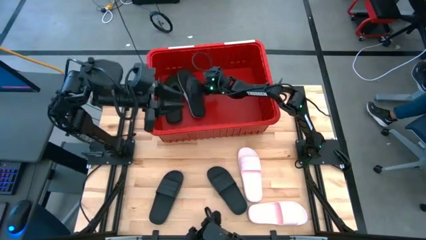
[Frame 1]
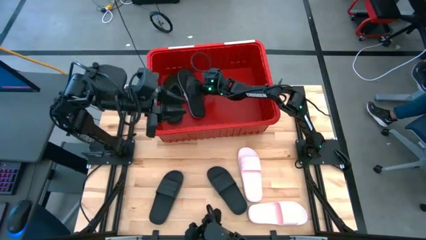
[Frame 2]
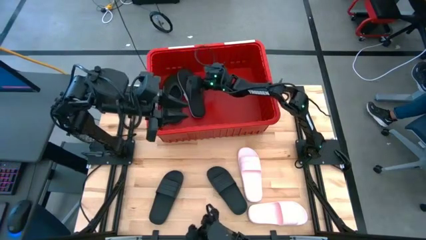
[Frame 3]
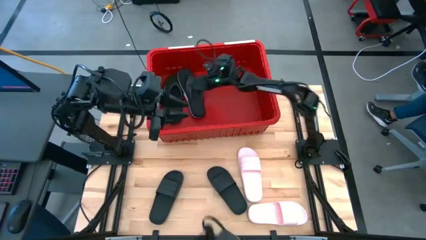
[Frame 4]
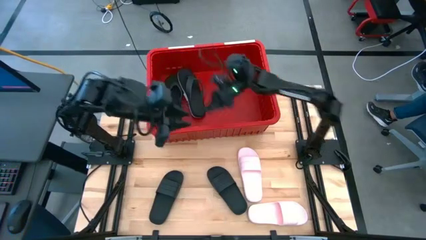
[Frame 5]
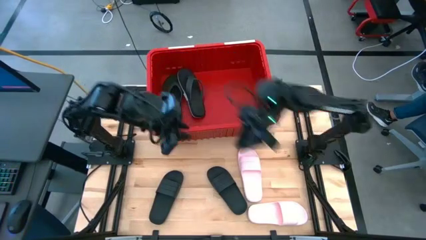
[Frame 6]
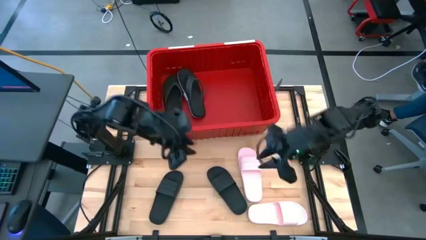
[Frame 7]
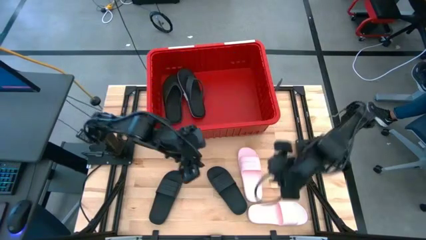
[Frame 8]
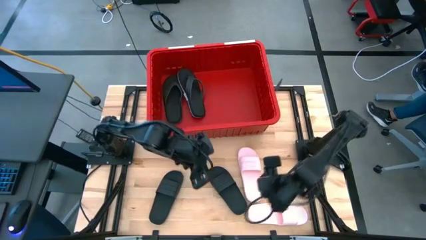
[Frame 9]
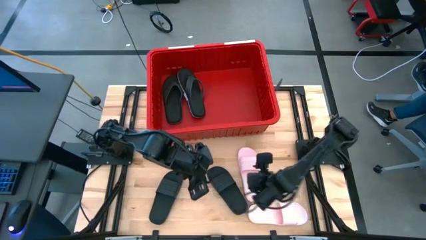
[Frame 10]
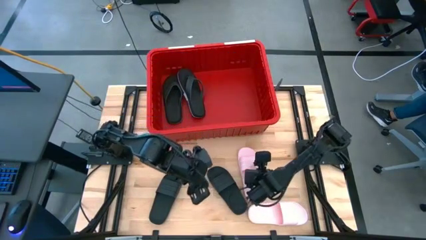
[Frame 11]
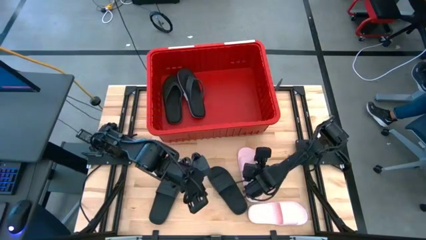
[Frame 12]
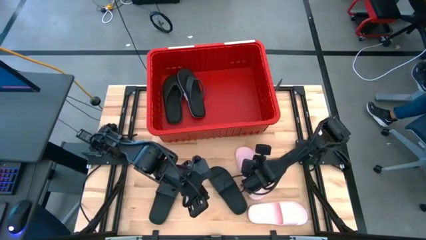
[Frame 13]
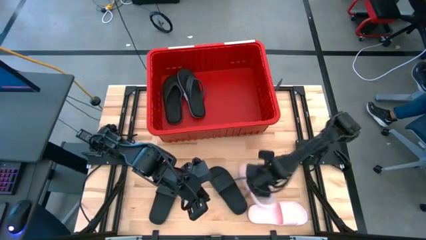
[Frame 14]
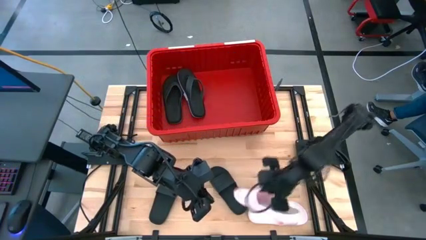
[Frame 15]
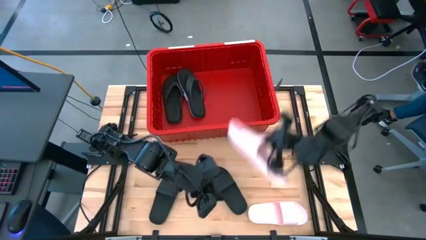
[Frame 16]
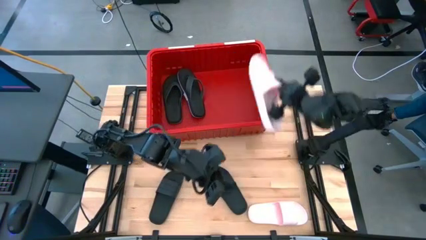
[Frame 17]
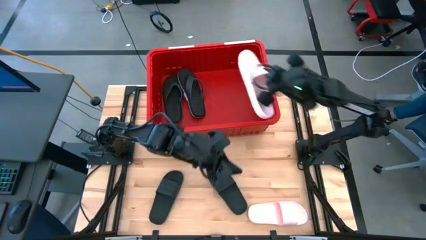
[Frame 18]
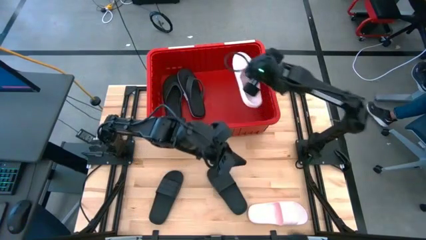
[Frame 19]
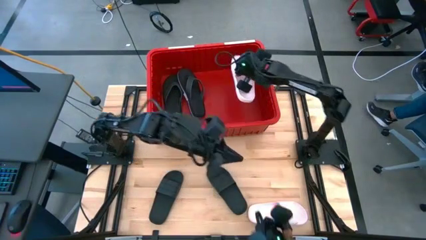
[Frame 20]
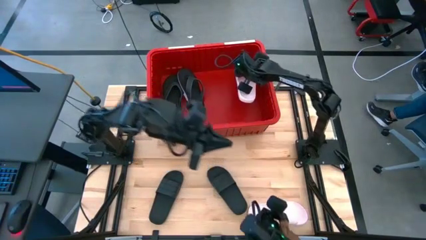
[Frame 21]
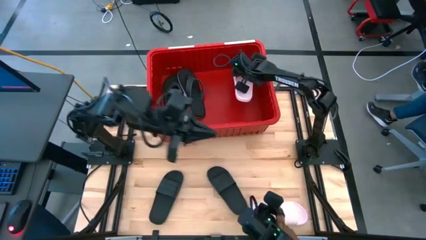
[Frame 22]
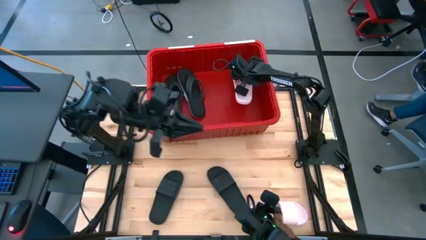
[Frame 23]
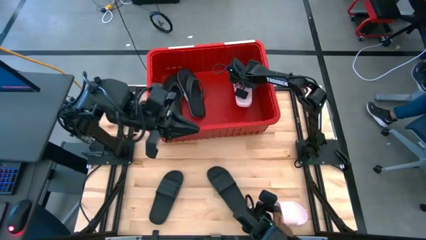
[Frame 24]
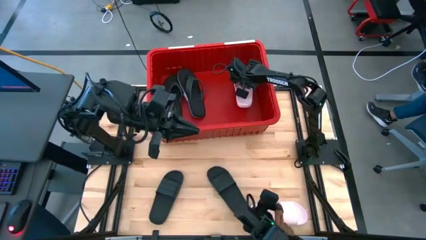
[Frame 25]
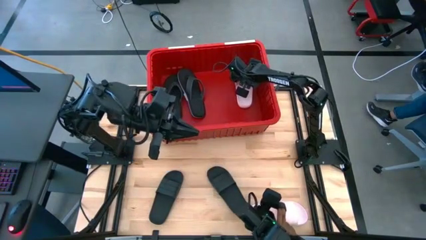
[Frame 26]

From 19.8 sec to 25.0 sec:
Task: Pick and place slides into bin
Put the top pink slipper into the red container

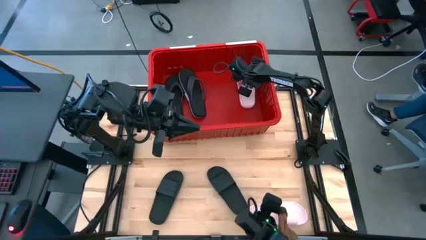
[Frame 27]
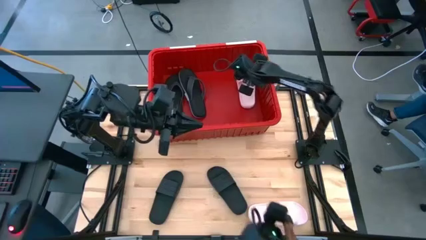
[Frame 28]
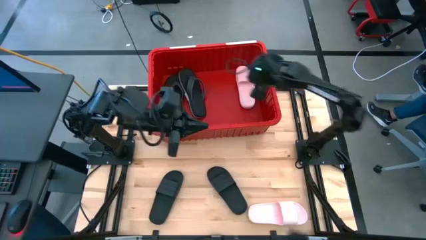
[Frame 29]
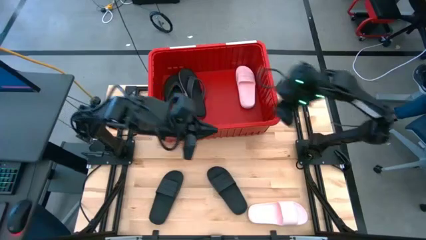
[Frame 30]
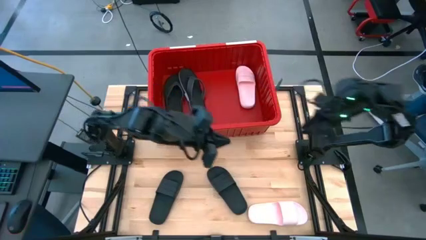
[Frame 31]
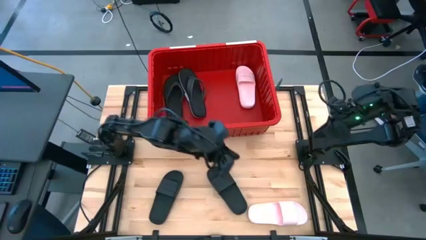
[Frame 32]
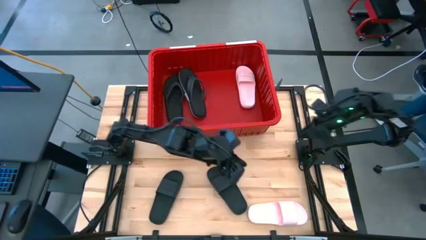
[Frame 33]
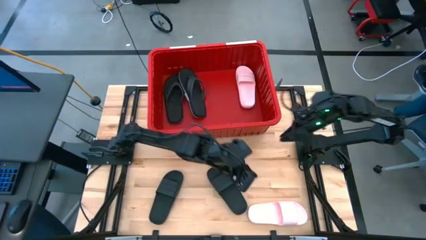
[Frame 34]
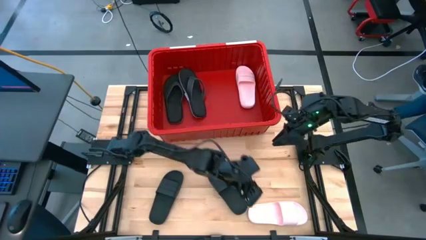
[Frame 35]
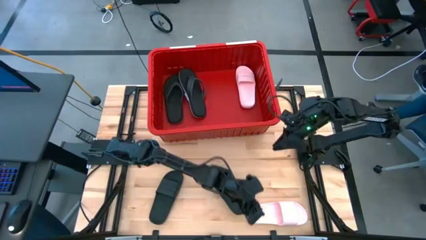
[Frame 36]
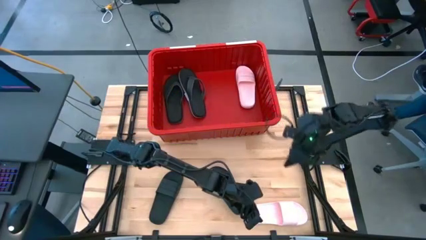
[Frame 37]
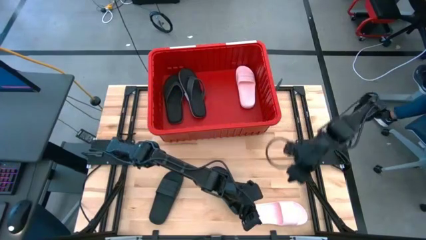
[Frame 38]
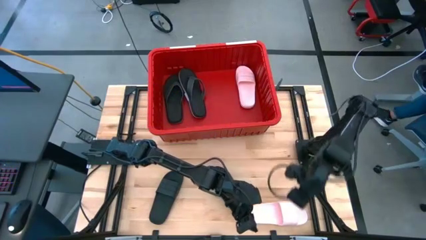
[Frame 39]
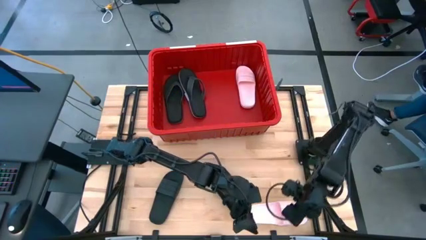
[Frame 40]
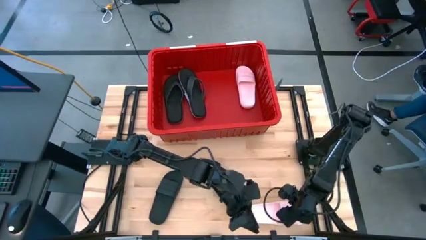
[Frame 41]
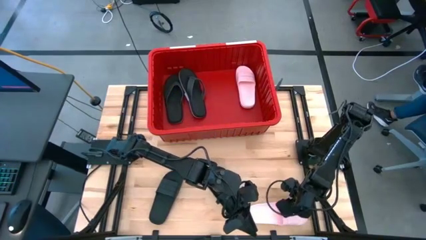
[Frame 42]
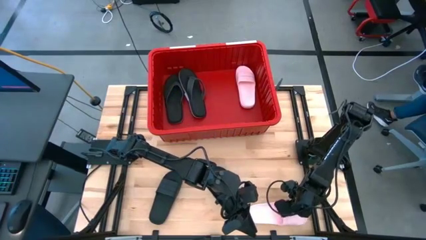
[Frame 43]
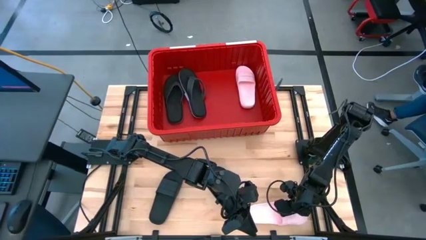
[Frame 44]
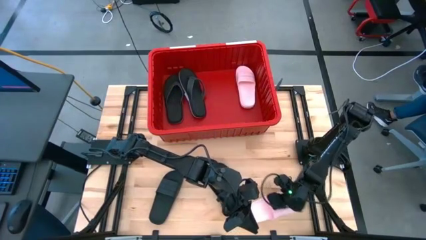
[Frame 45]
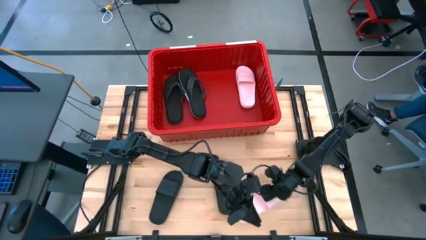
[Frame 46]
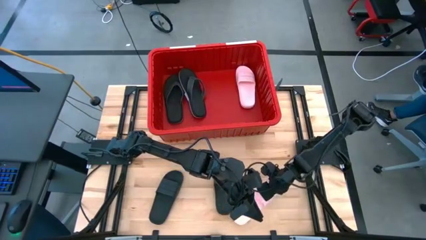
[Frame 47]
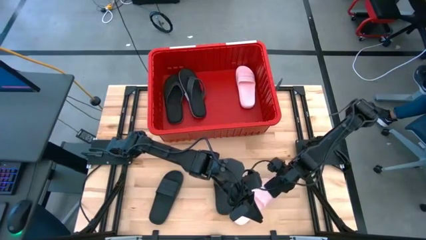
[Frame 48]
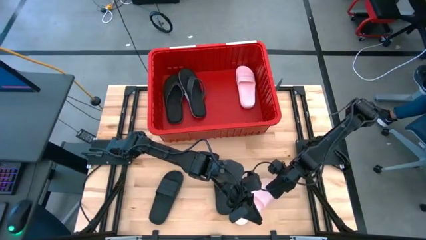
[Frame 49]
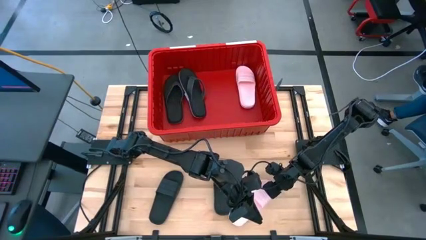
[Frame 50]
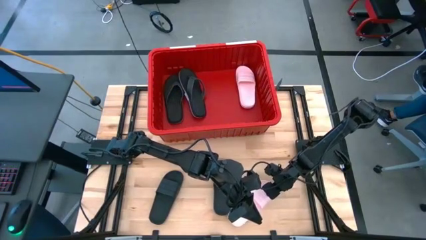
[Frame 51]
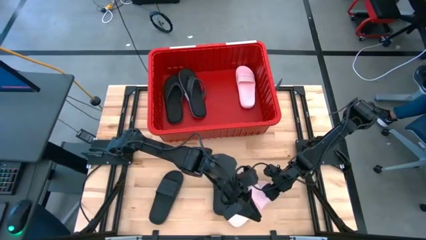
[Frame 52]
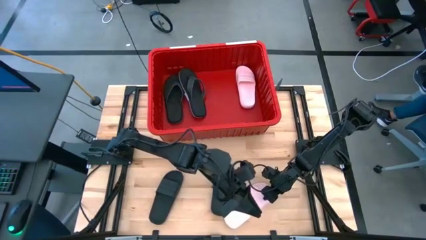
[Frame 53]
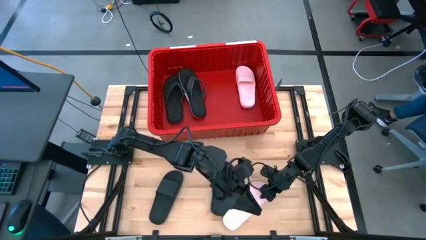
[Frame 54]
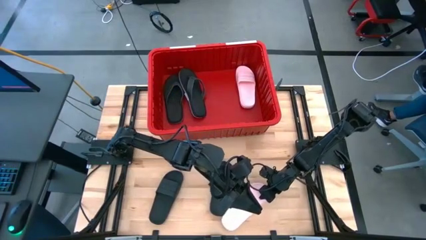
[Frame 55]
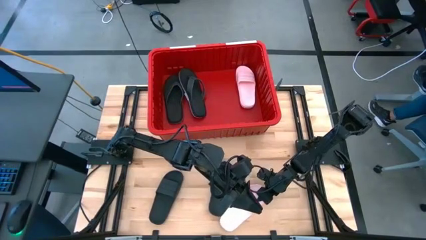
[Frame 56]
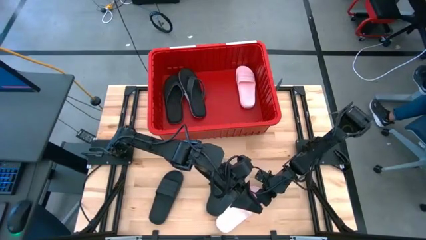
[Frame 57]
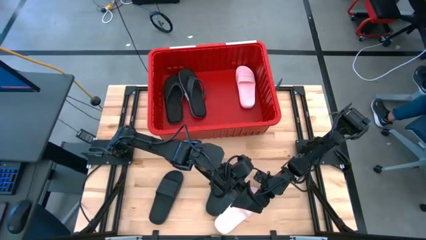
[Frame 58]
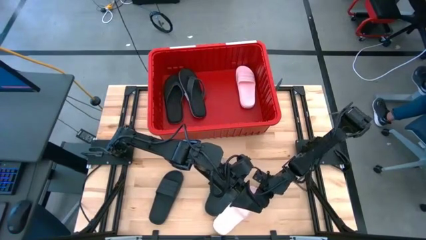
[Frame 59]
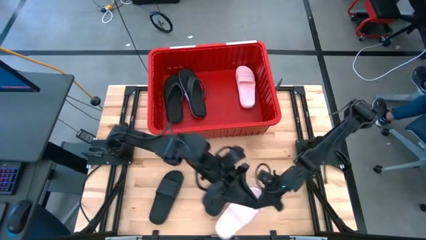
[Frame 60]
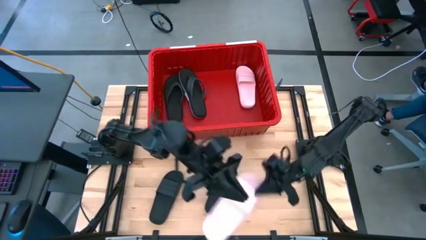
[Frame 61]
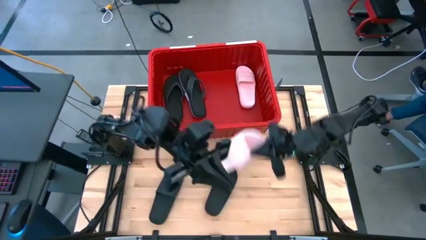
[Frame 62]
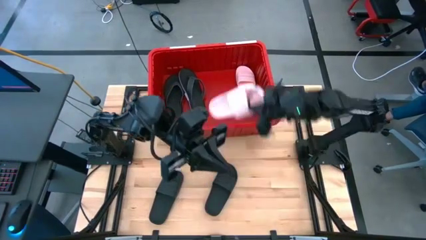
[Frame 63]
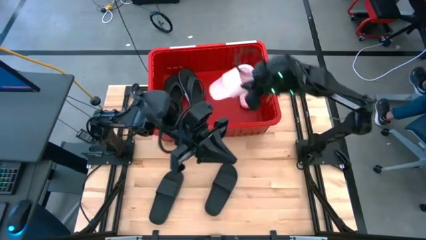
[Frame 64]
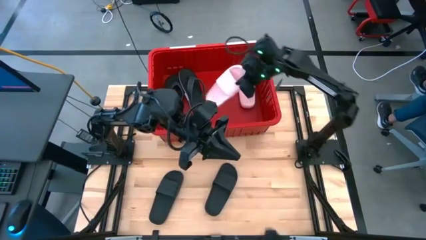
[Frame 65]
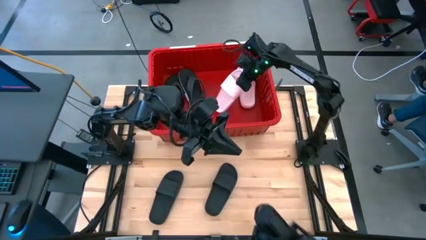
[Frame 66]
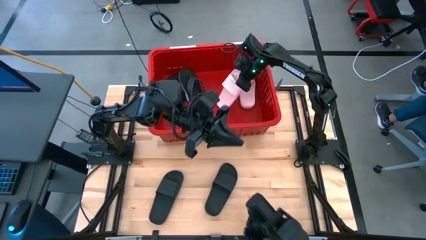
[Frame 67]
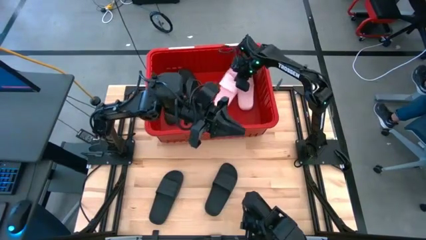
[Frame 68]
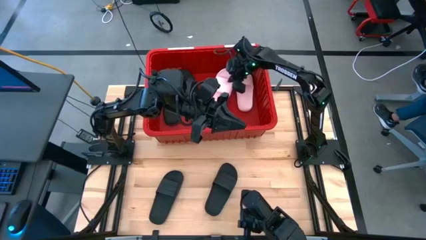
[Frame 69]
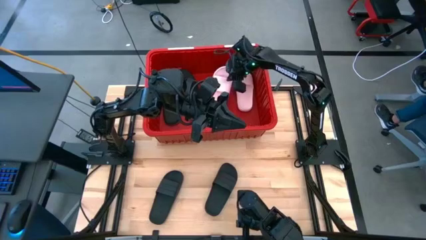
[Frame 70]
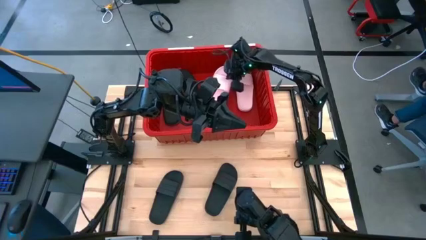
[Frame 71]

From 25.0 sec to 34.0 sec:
Put the pink slipper into the red container

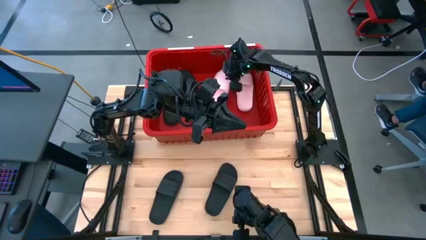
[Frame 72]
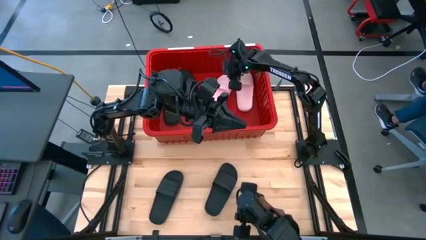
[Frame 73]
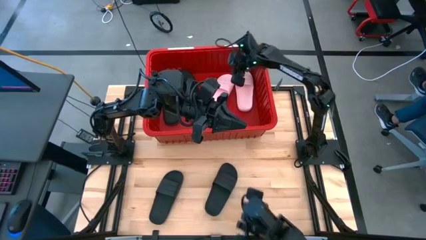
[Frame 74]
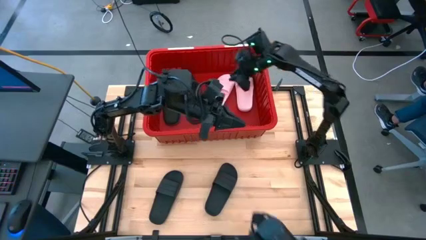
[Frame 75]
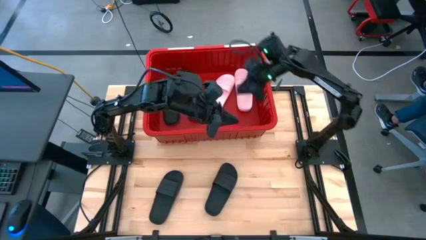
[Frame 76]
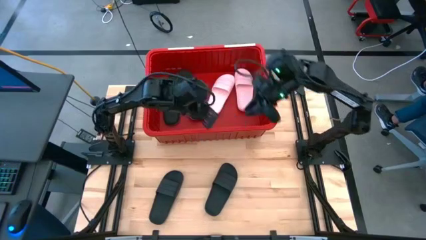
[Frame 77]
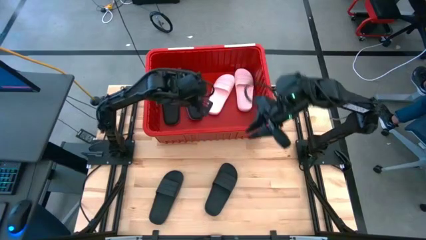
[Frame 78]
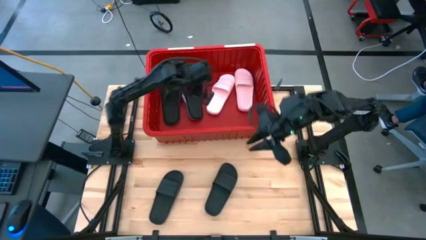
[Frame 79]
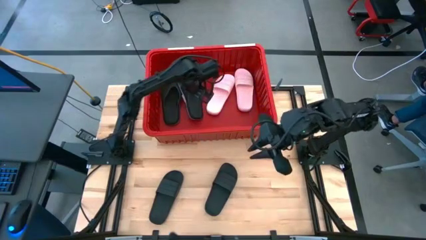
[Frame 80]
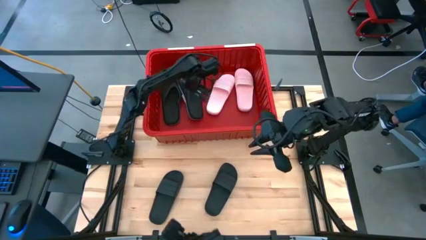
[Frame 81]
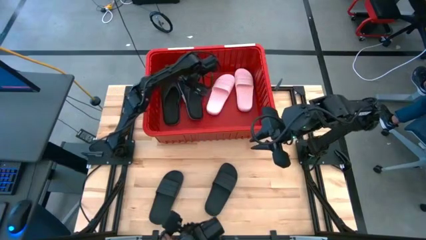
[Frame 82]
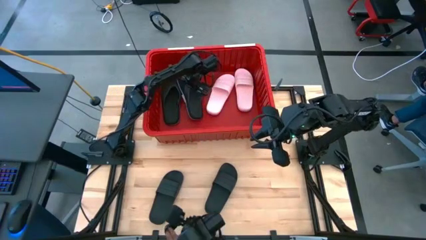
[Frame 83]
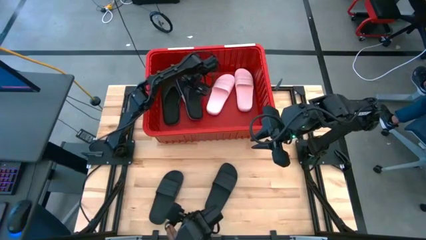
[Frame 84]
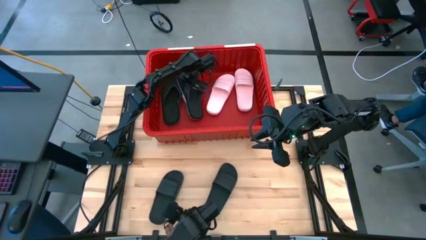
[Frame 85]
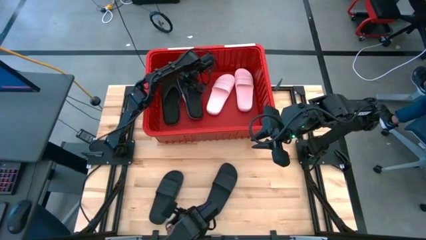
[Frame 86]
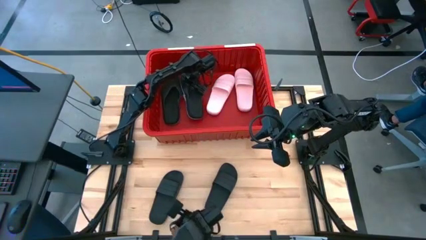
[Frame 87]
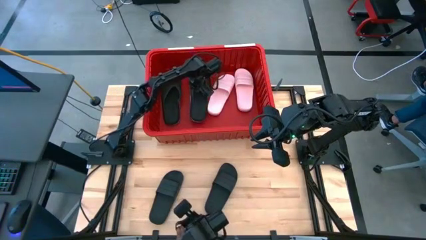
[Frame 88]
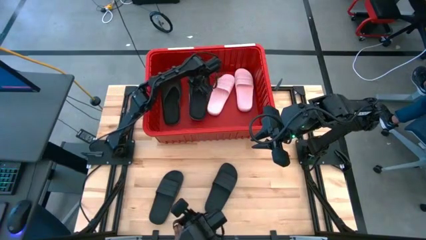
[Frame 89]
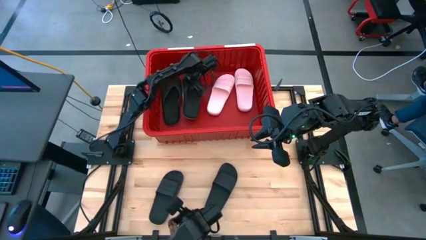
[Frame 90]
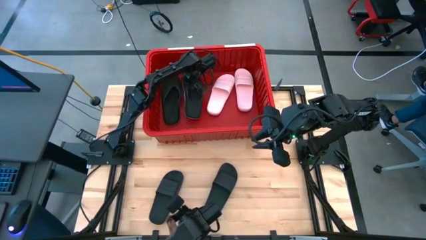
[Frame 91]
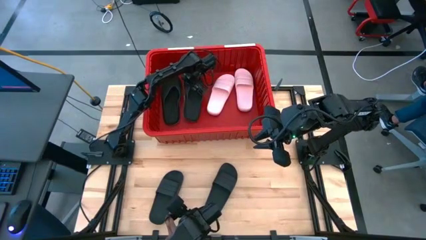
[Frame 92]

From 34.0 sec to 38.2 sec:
Adjust the black slipper
